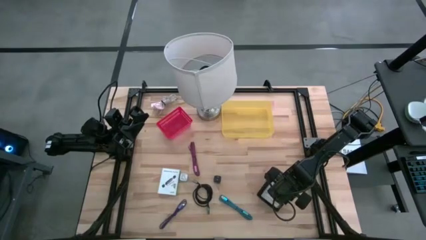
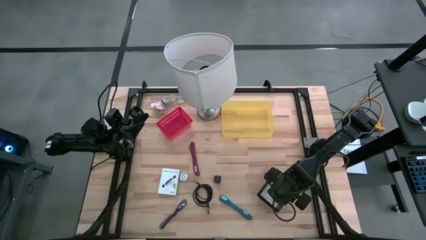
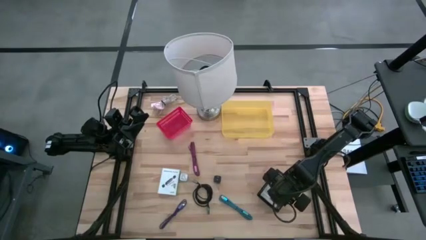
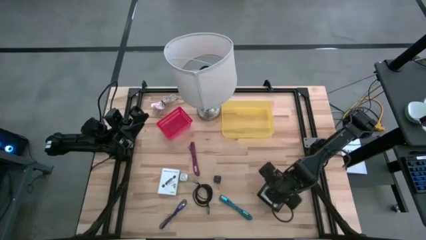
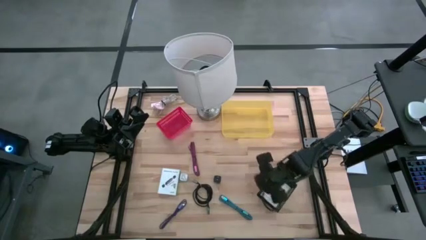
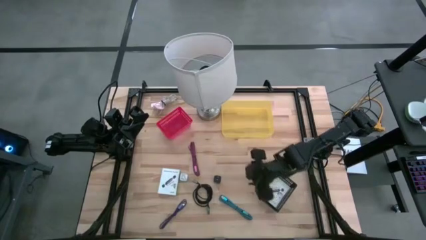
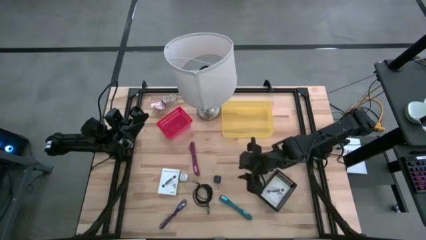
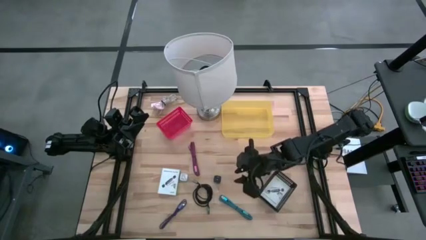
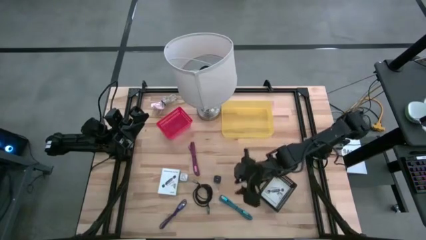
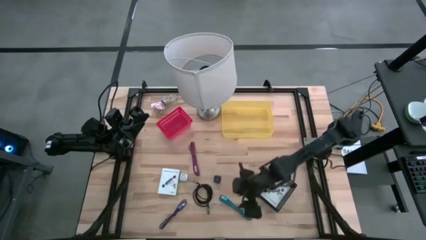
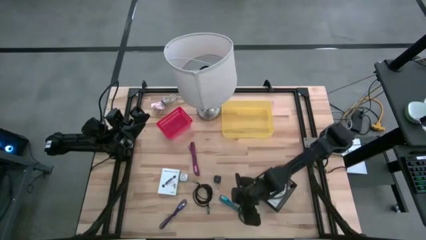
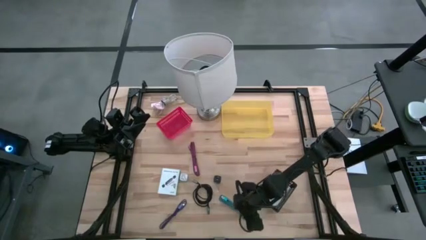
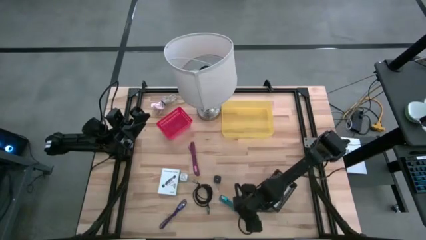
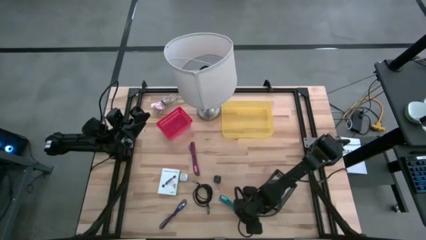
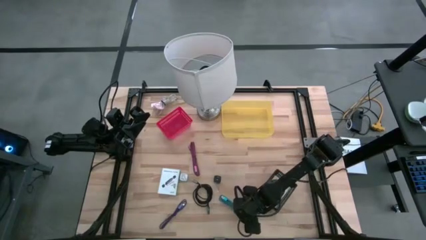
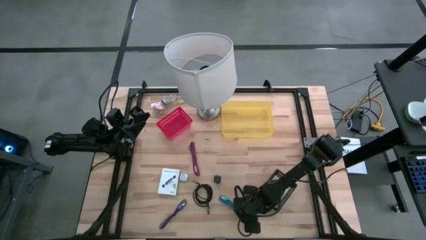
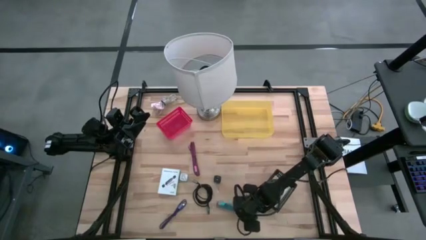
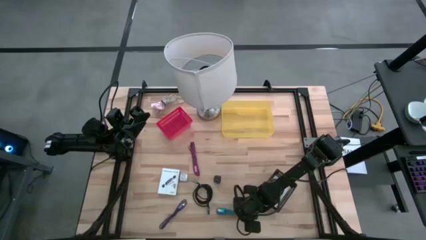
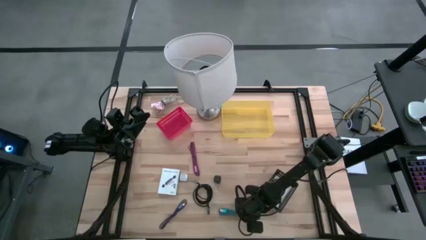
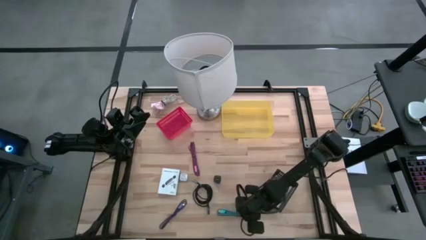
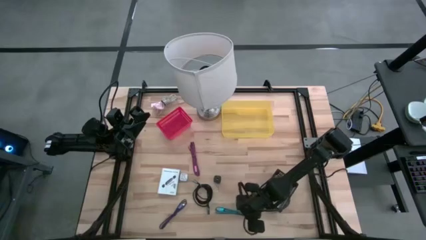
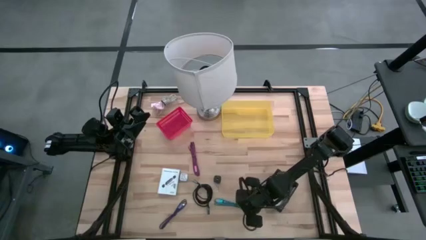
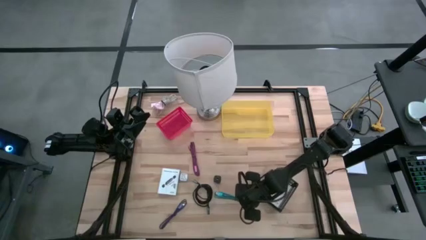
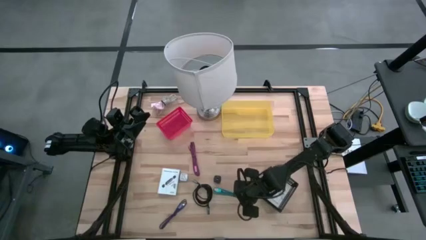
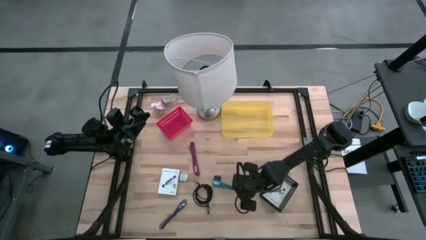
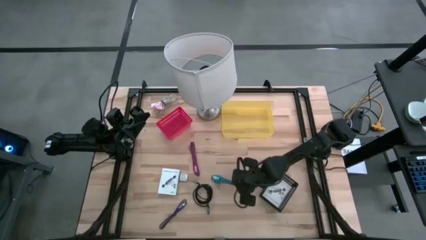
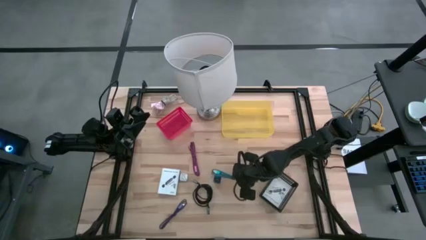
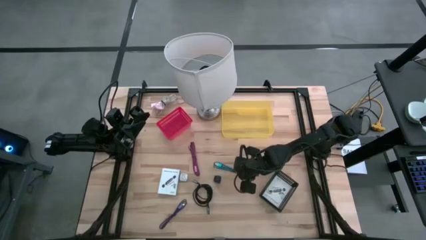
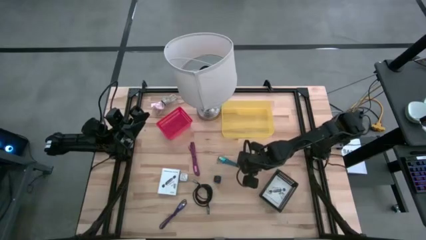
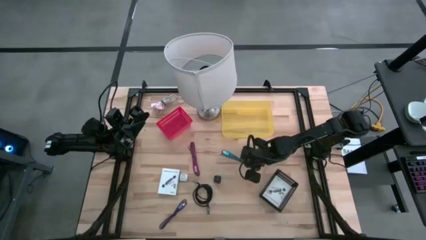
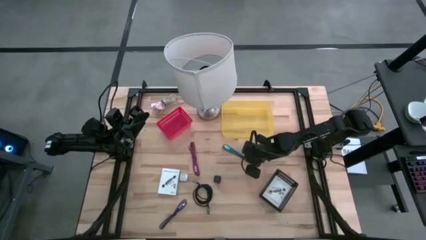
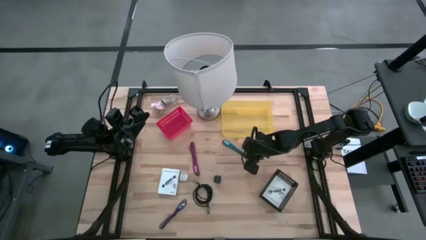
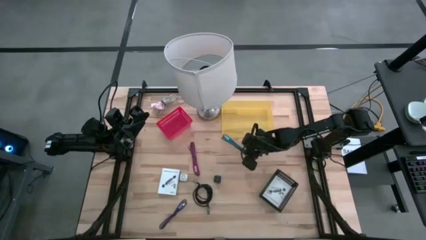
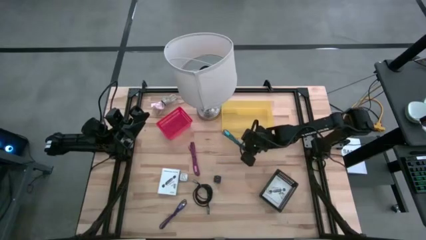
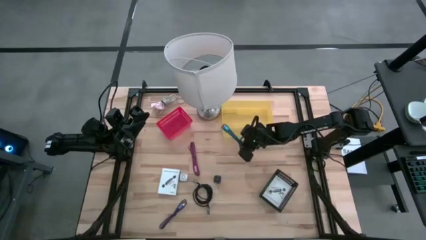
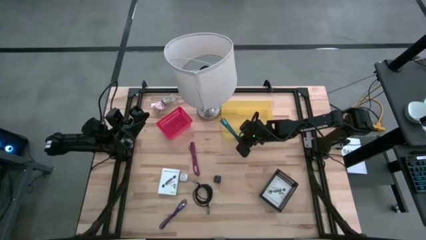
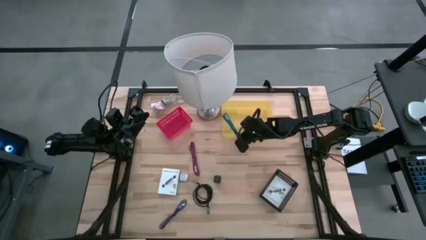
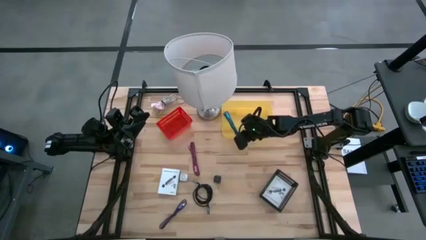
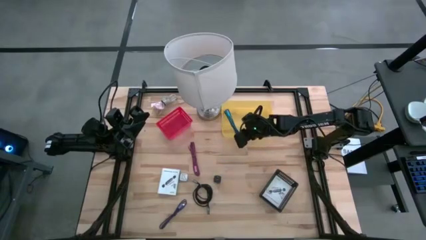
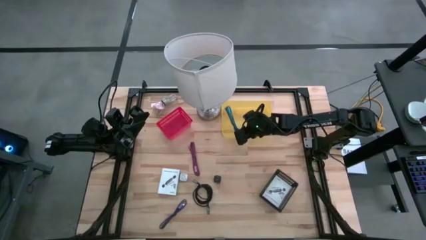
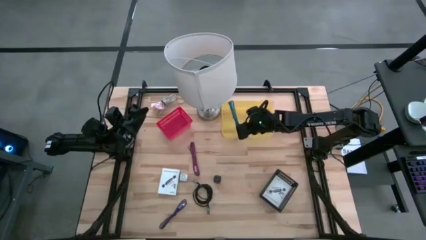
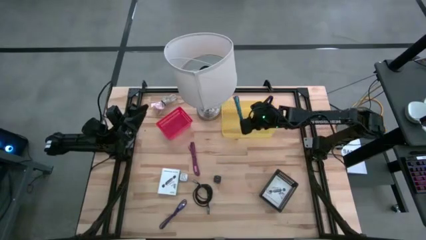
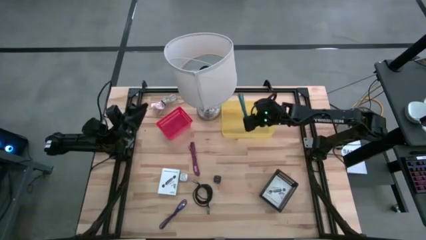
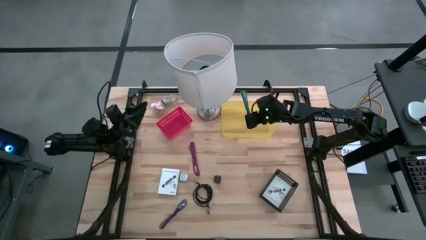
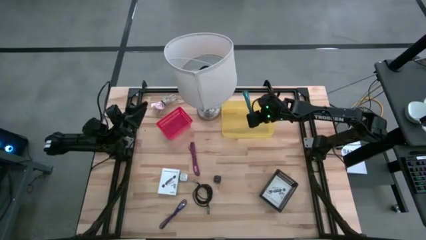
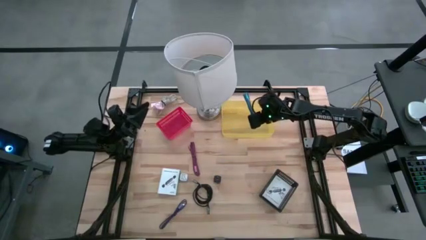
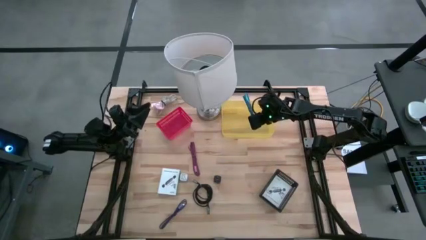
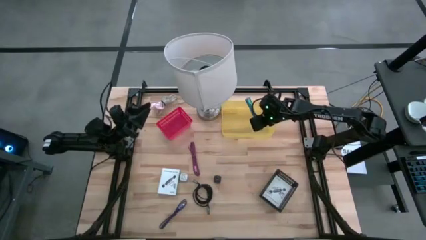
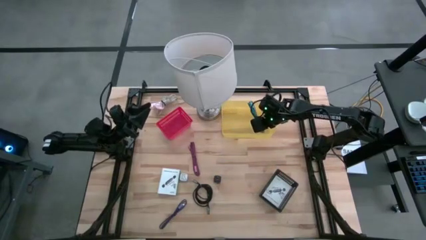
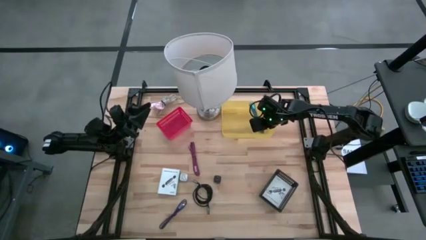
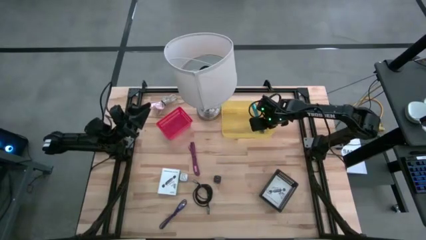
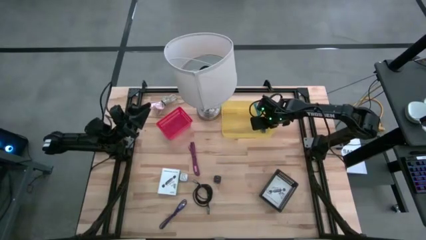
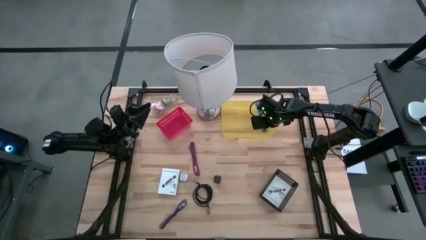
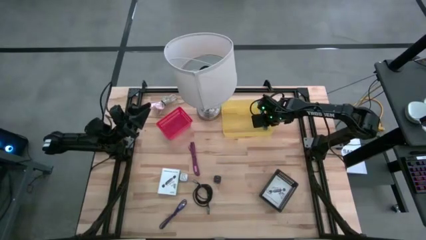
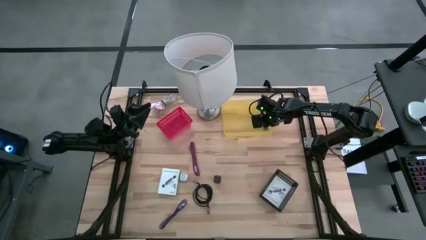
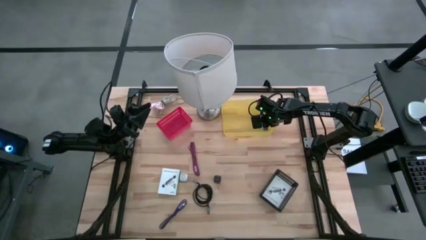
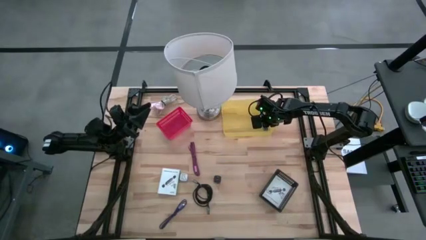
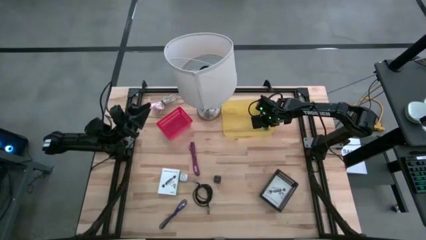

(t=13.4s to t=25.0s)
Task: Pick and place items into bin
Put the blue charger cable into the yellow bin

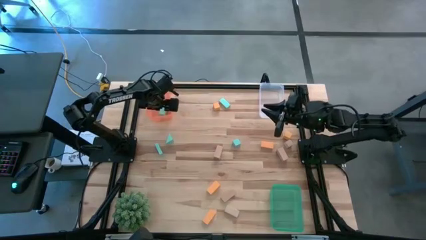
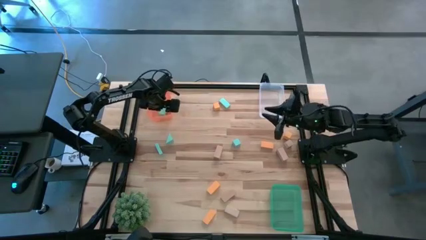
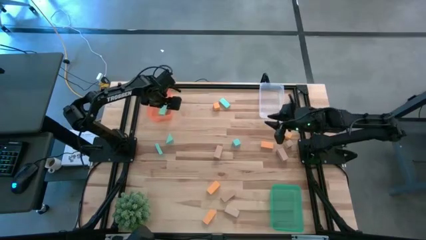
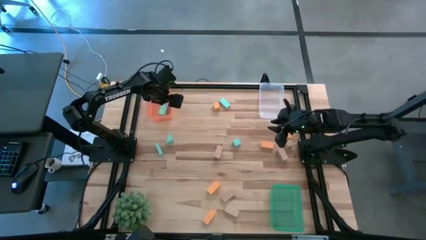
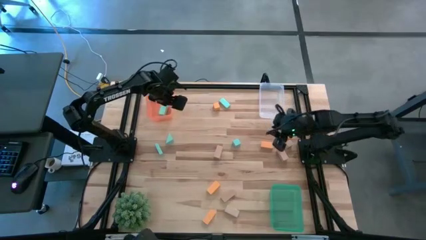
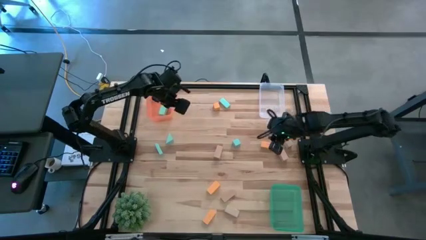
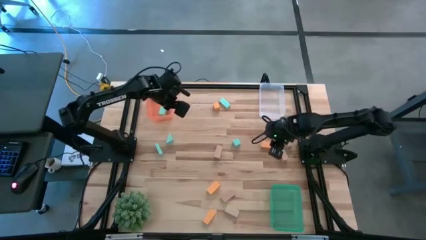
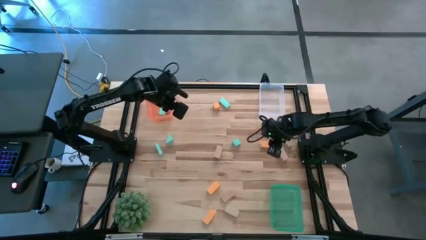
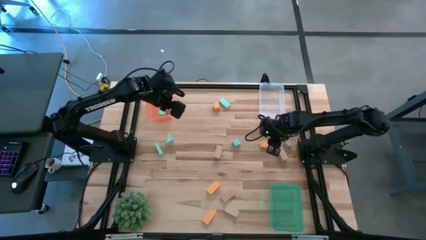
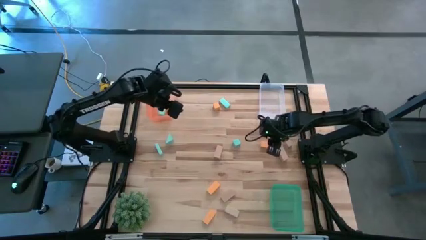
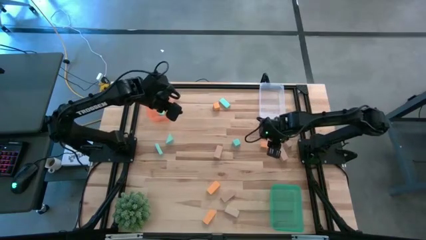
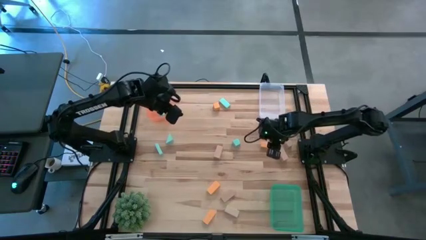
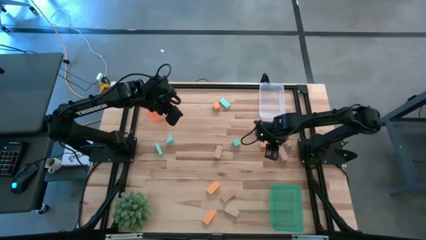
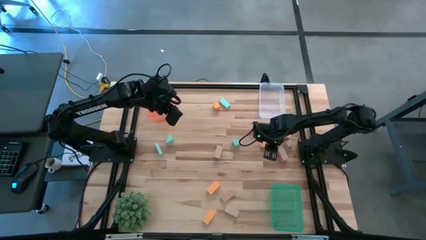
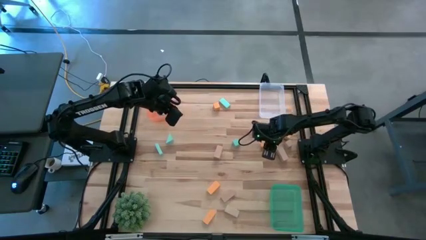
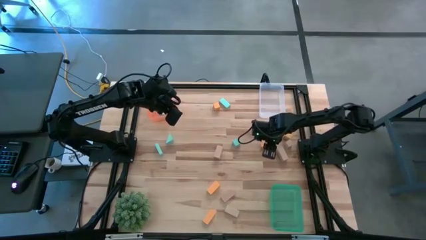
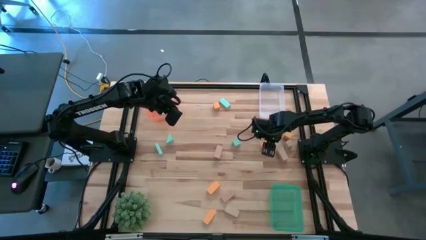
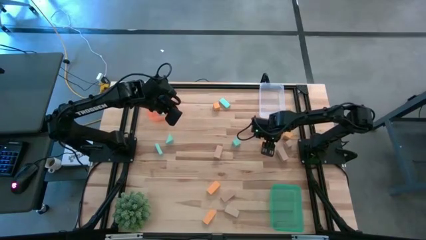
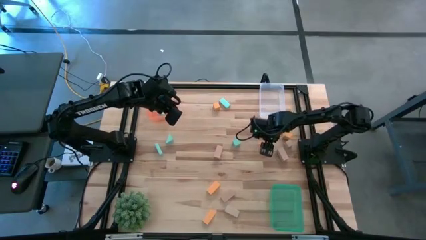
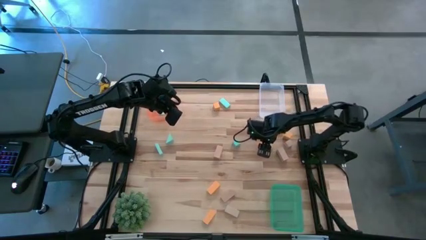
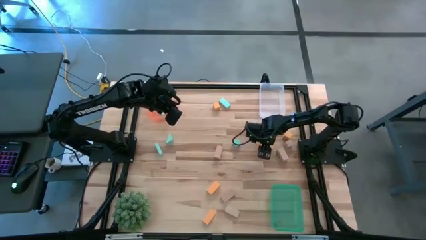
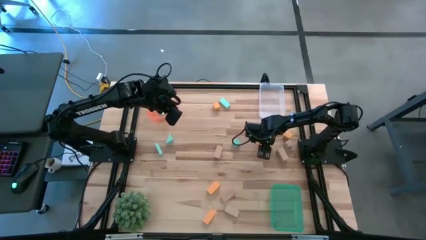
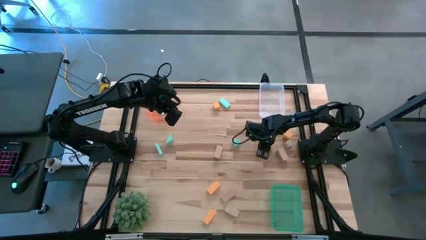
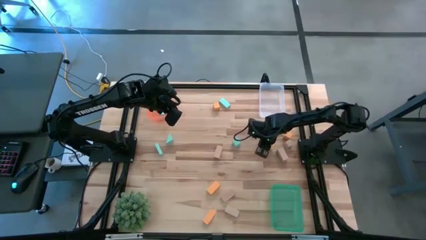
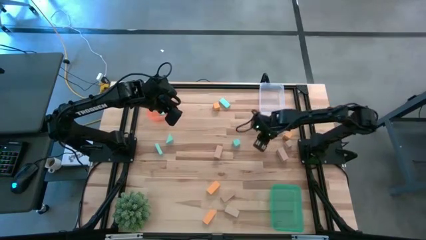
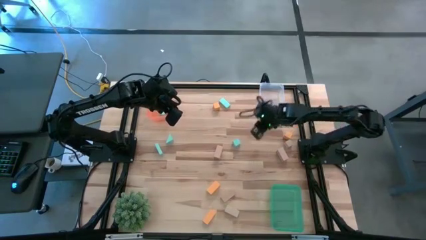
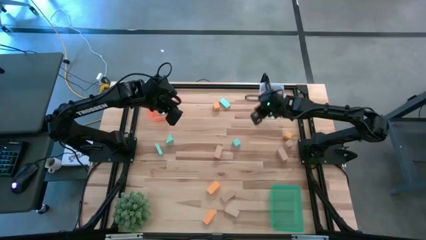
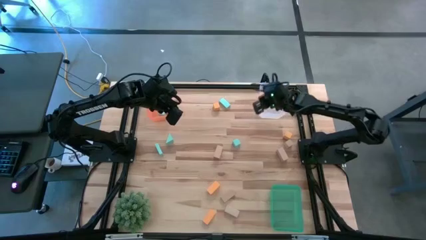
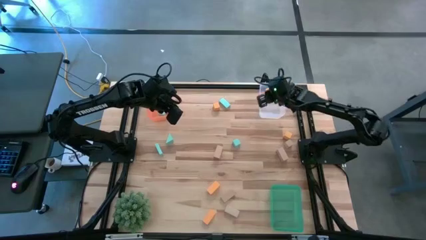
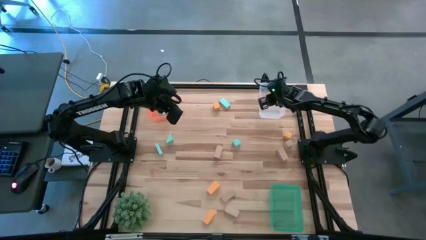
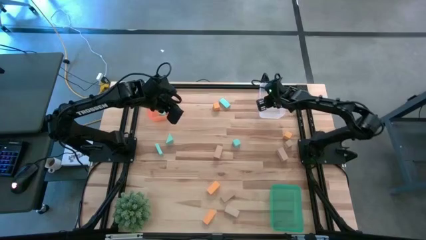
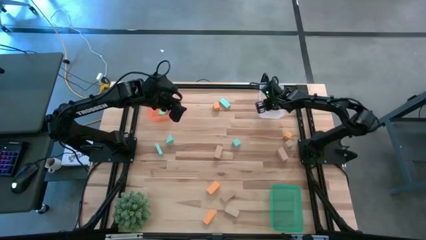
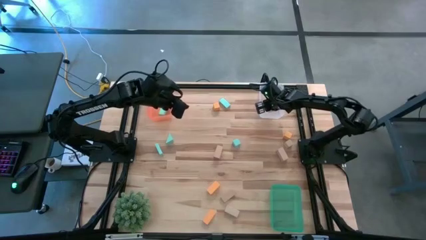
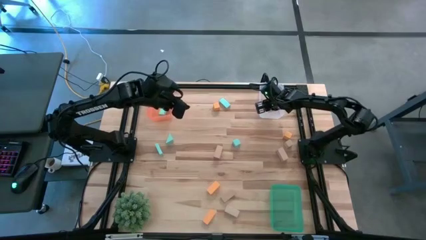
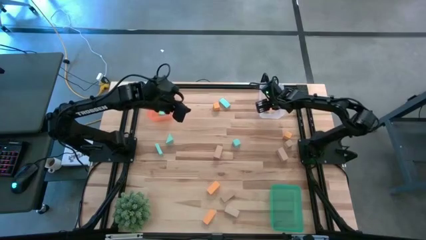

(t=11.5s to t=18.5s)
Task: Sort & place blocks by color
Put the orange block into the transparent bin
